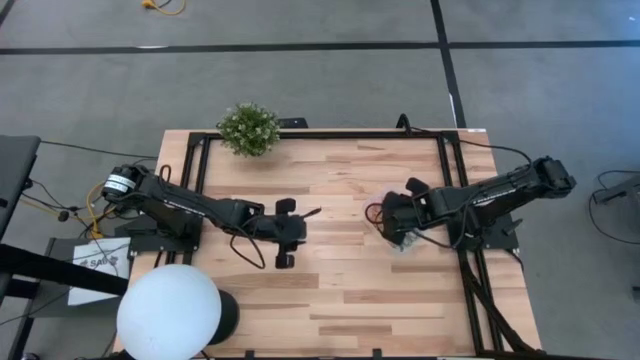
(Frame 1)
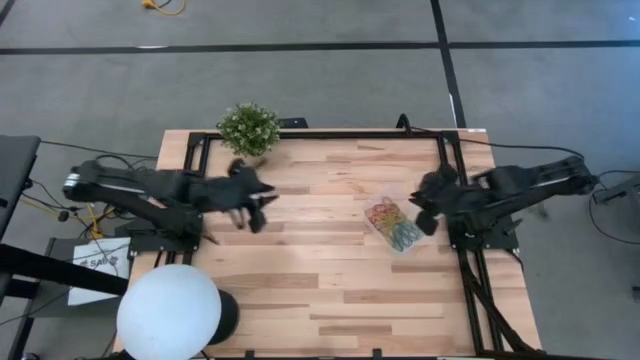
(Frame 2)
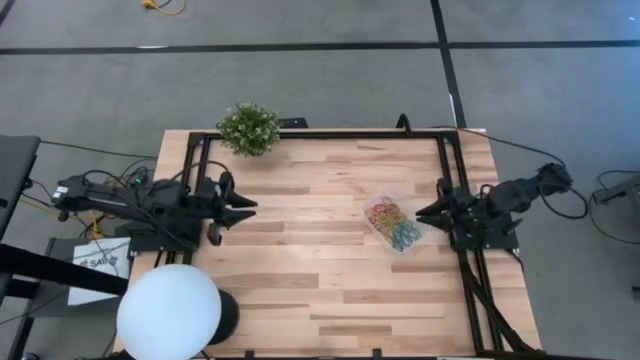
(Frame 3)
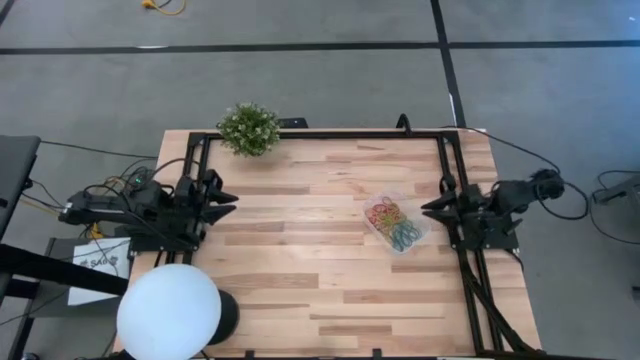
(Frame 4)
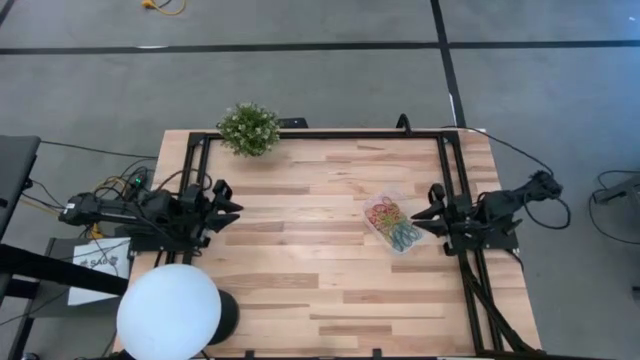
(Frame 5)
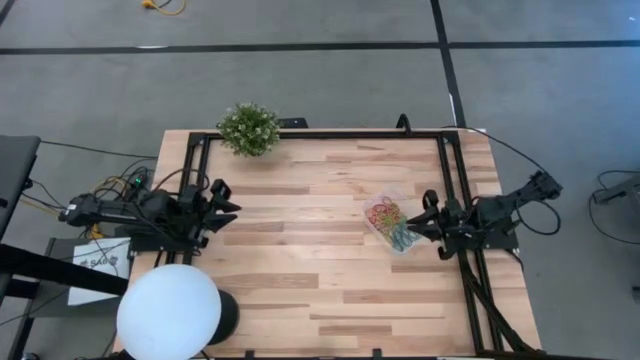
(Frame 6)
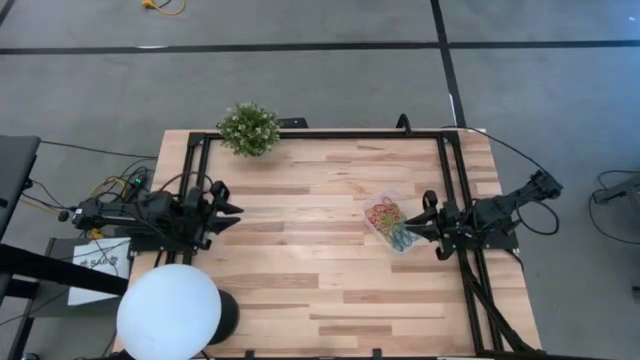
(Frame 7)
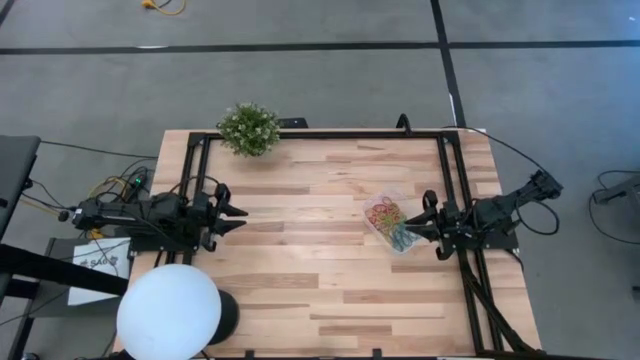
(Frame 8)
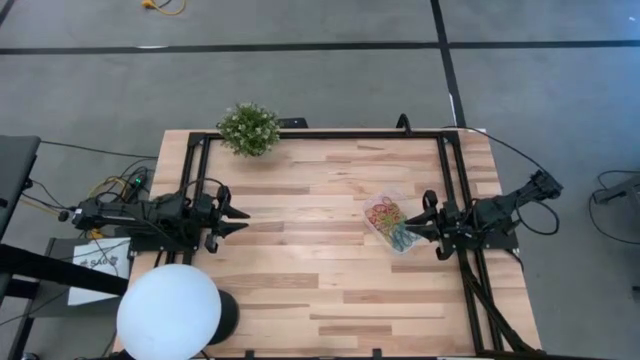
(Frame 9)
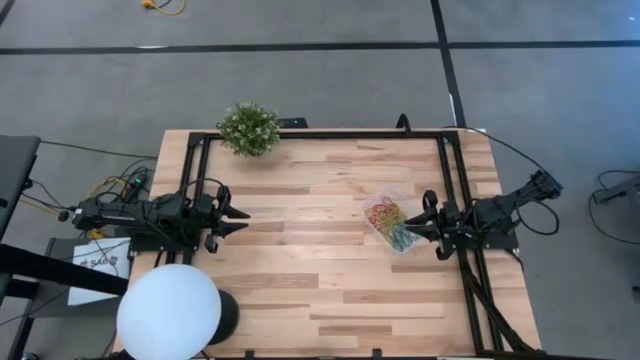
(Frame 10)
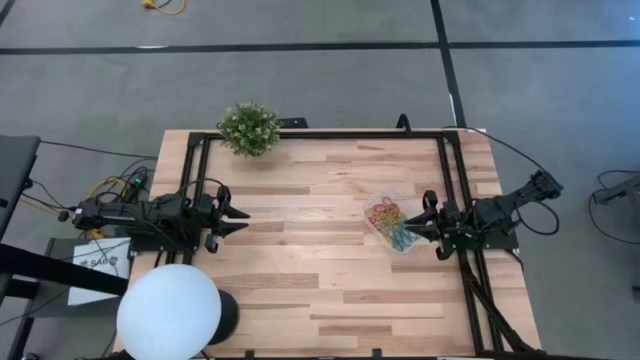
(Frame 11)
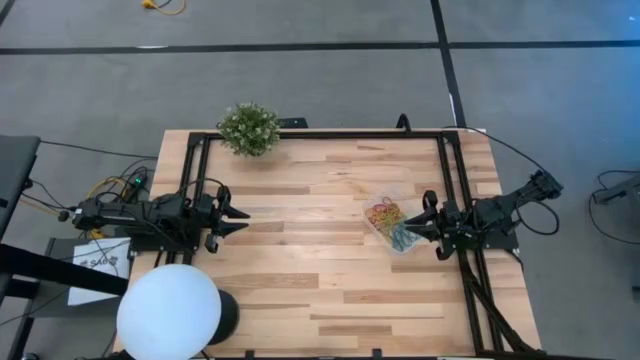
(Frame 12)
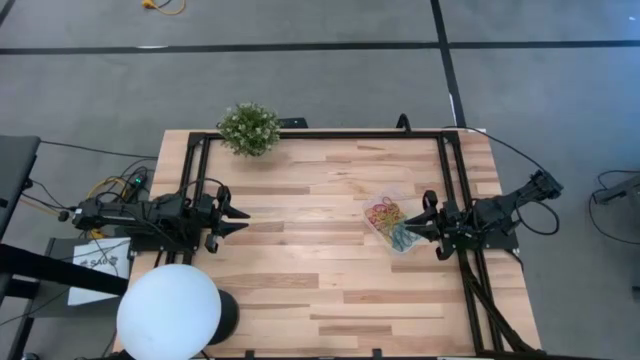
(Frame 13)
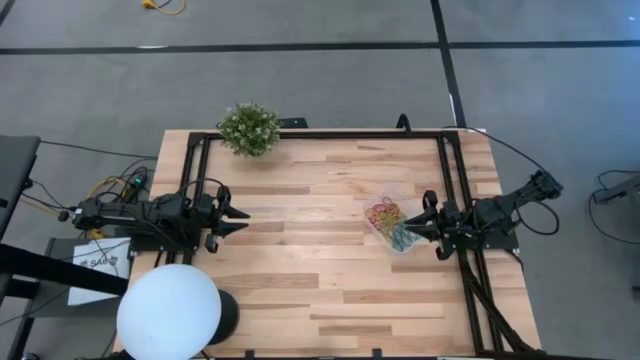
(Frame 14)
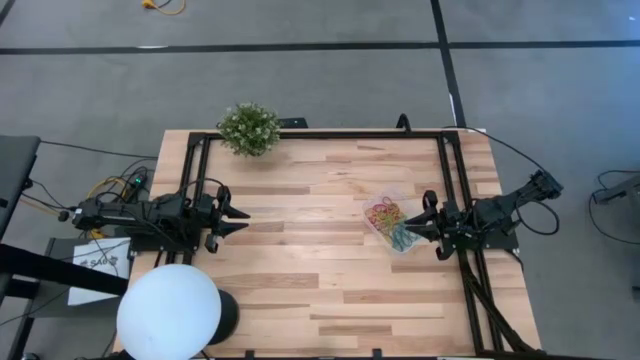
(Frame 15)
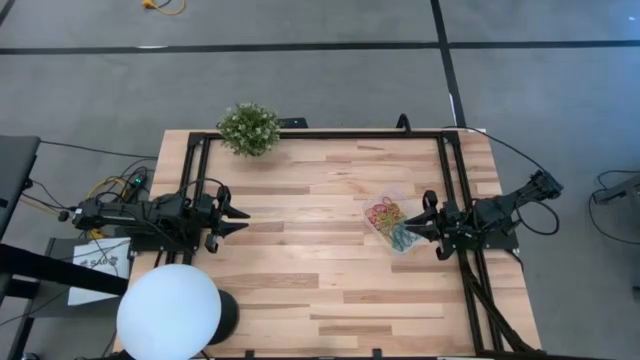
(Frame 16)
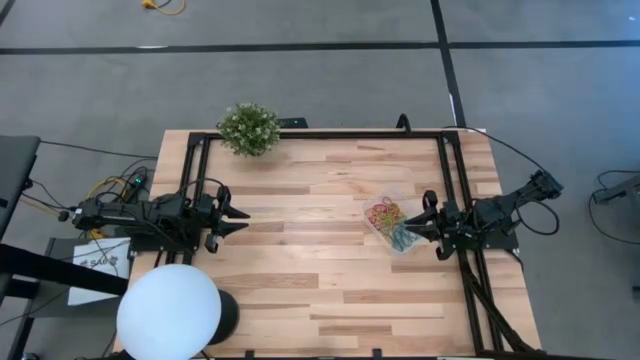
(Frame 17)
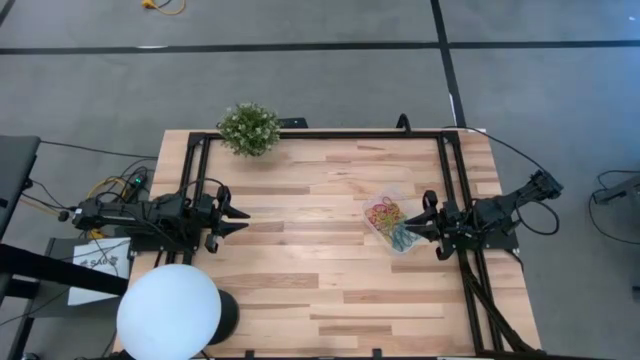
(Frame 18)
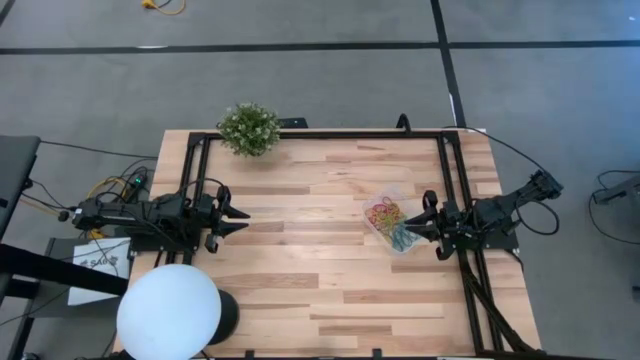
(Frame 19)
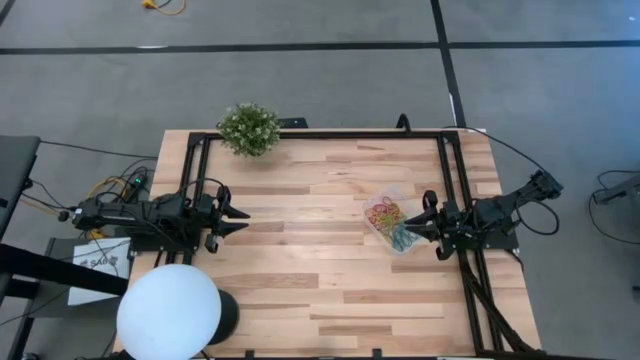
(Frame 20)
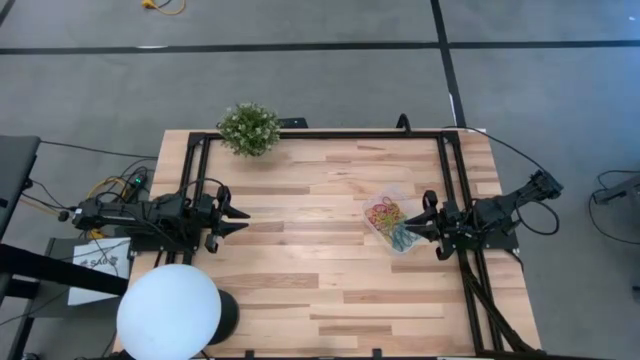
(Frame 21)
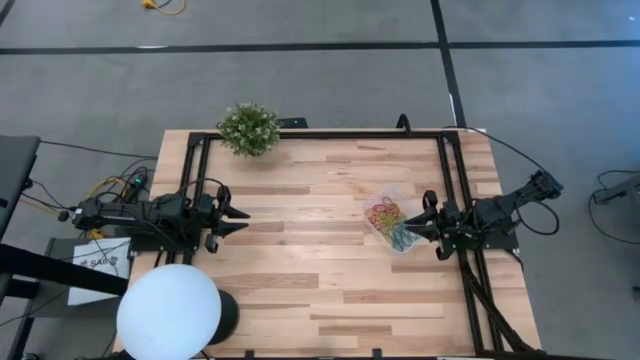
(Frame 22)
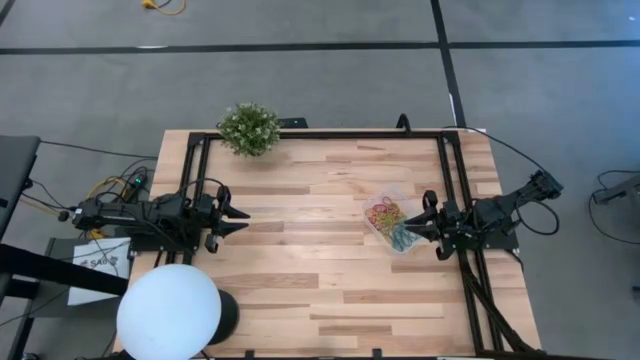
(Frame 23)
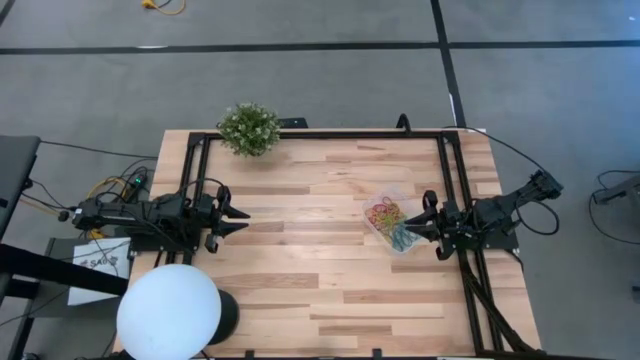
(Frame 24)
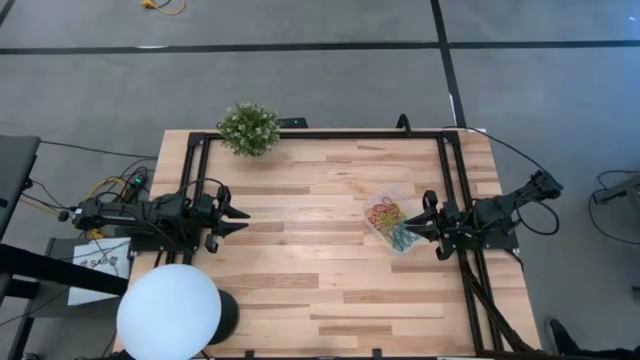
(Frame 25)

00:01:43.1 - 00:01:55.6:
Task: Pick and place items into bin
Return to Home Position

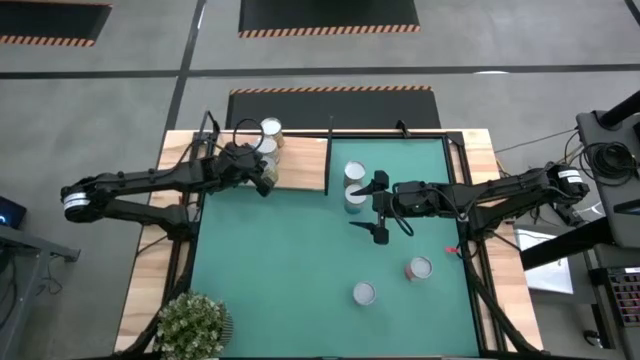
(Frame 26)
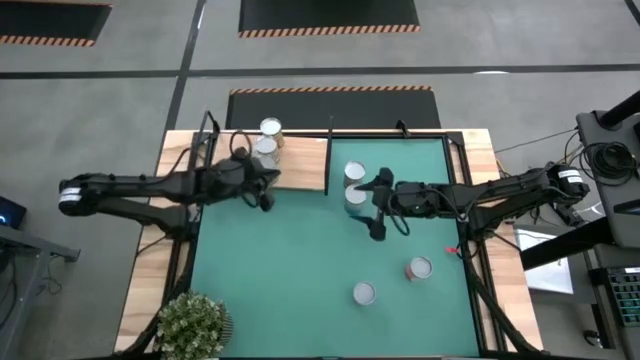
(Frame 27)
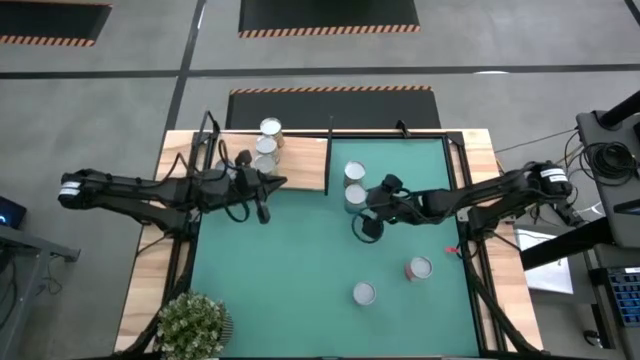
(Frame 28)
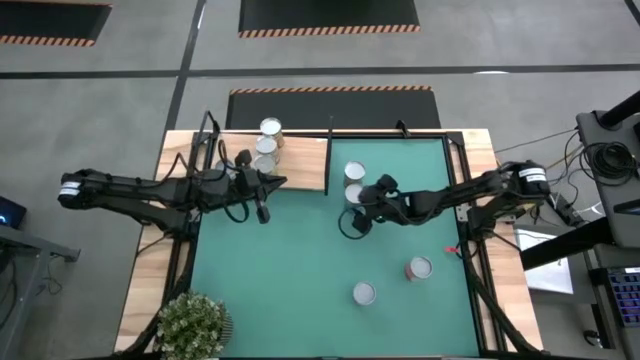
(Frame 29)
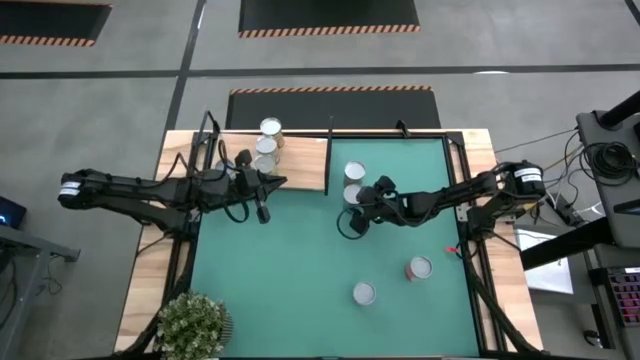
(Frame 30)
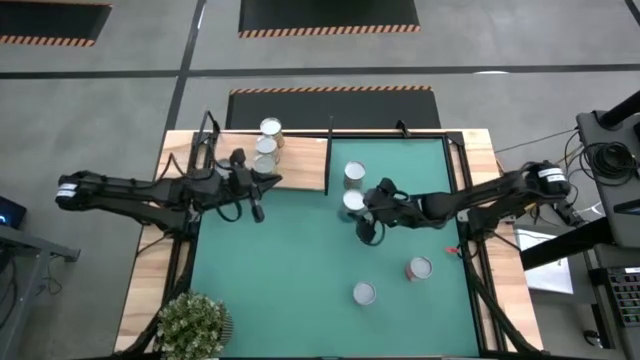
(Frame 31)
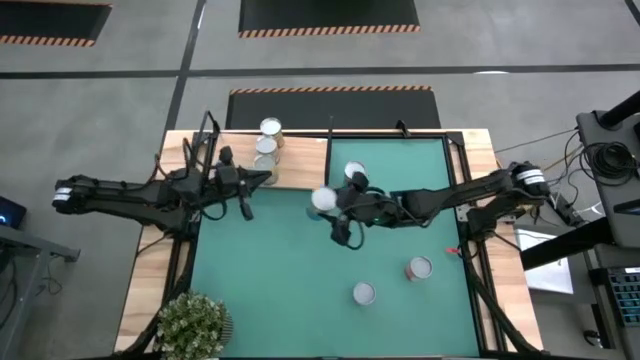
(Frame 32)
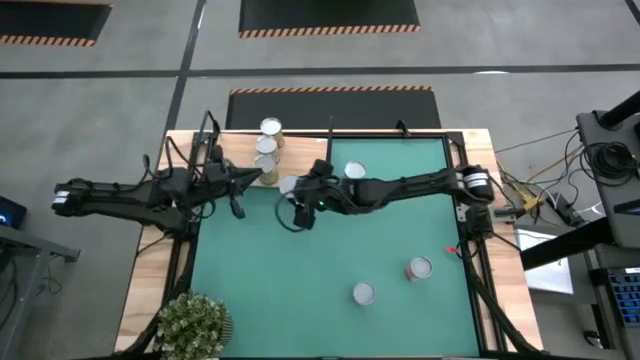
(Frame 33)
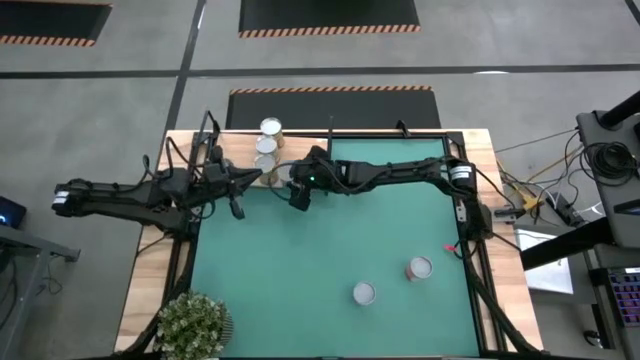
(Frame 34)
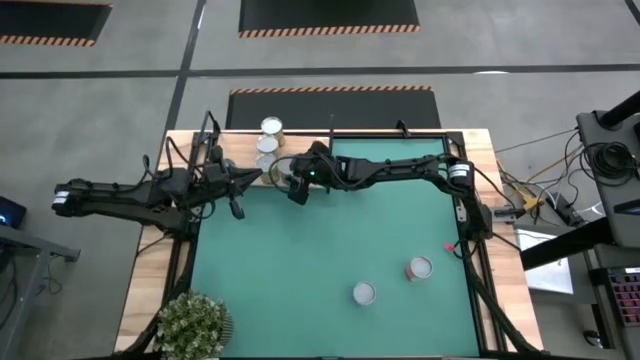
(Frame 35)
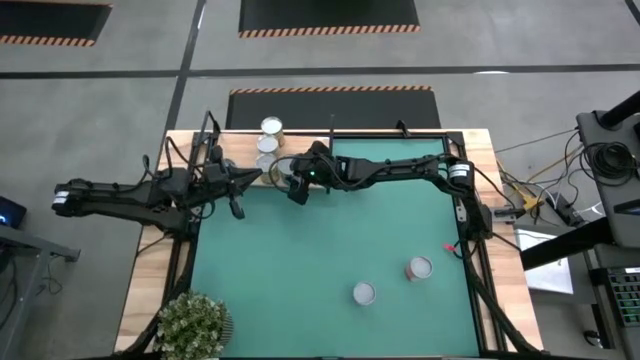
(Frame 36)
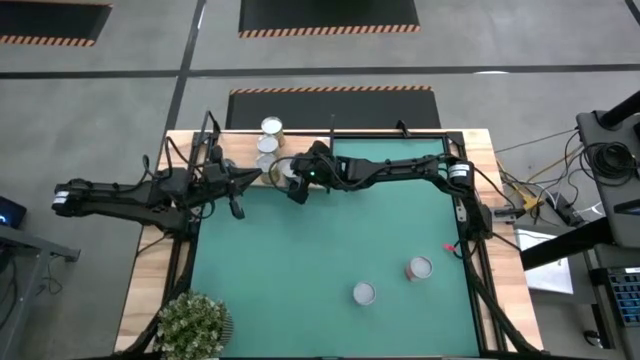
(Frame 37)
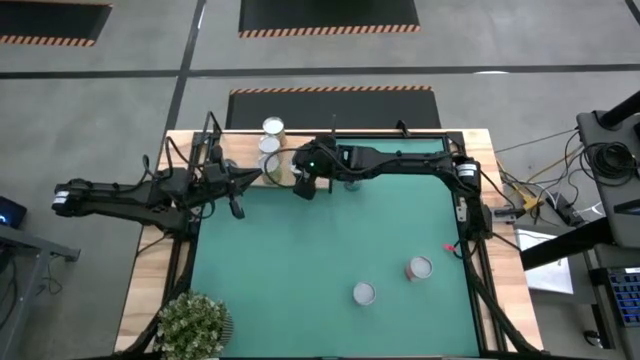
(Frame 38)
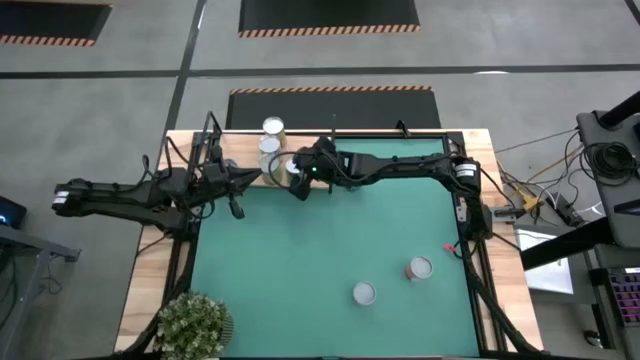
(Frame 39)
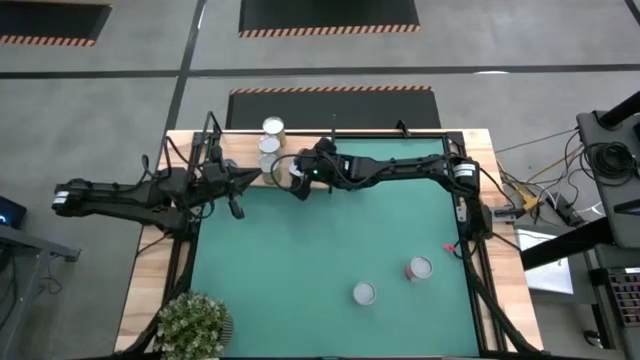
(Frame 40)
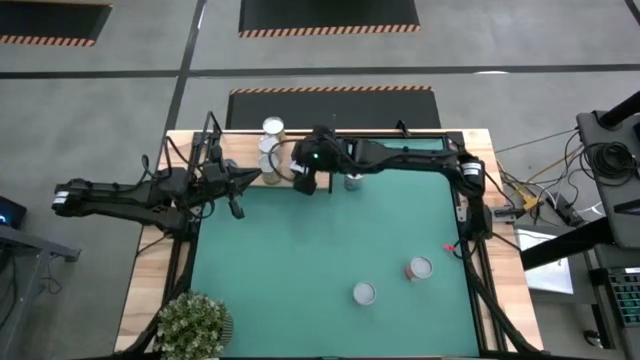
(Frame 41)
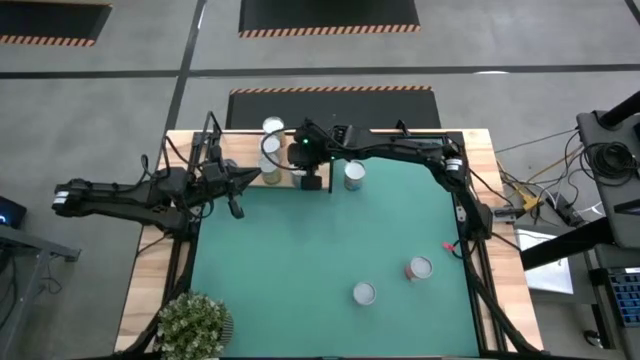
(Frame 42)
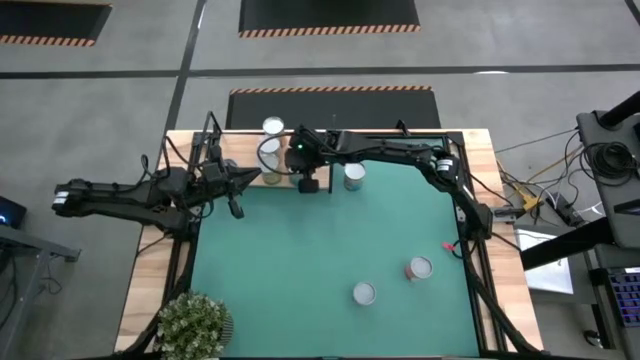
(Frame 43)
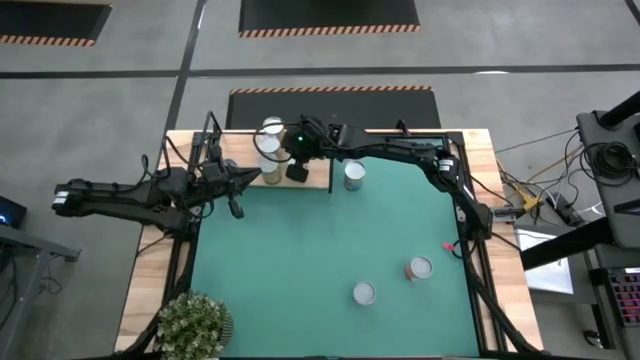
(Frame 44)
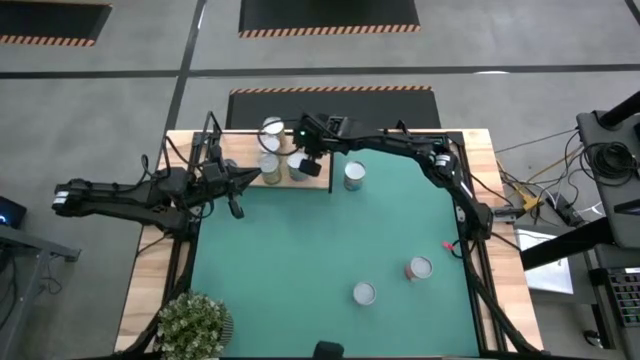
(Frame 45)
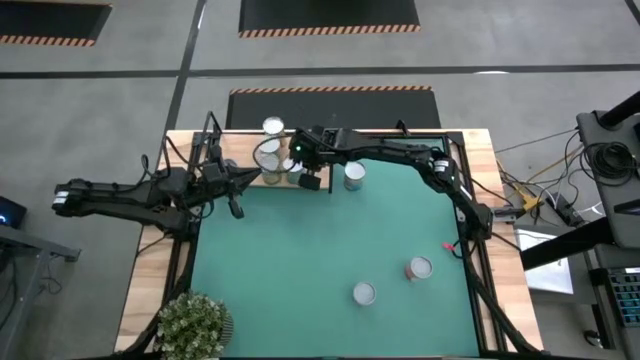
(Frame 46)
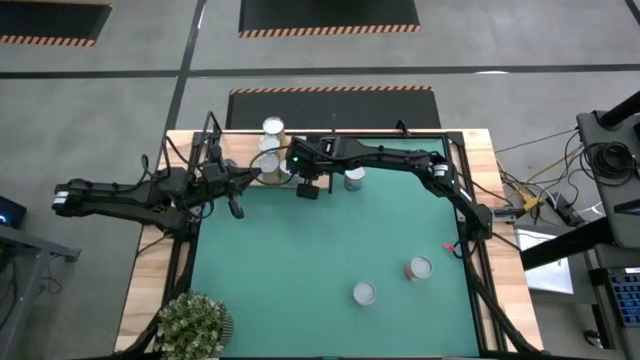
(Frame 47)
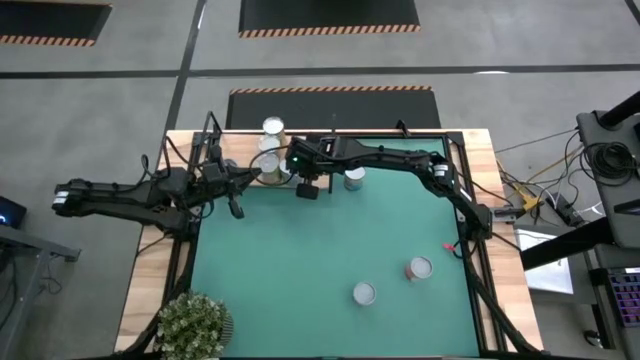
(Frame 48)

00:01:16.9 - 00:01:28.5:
Task: Pick and place cans onto a shelf
Put the canned cherries on the shelf
